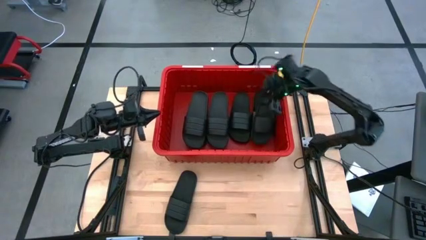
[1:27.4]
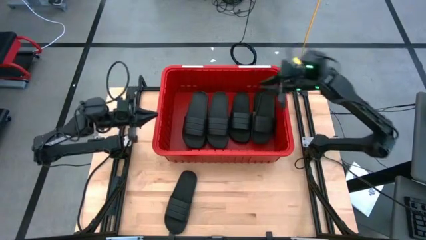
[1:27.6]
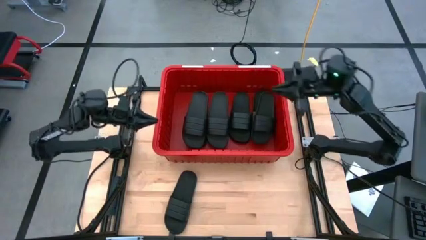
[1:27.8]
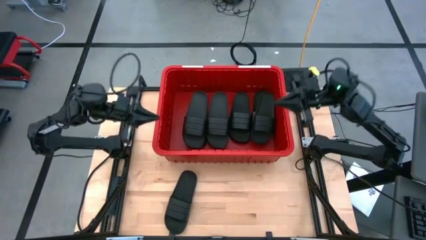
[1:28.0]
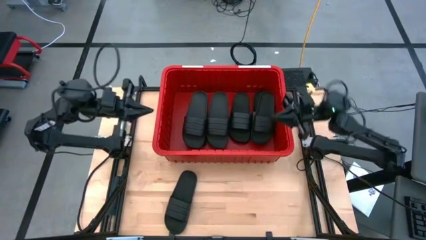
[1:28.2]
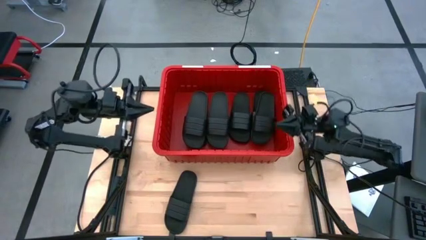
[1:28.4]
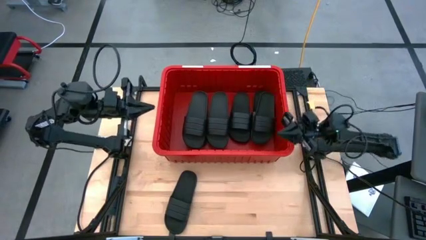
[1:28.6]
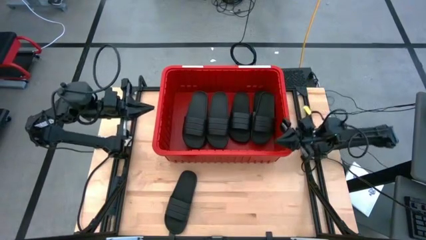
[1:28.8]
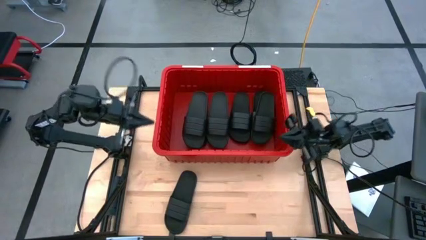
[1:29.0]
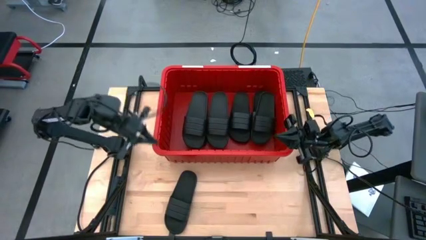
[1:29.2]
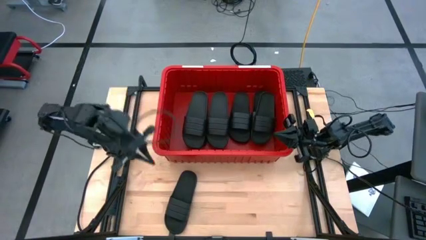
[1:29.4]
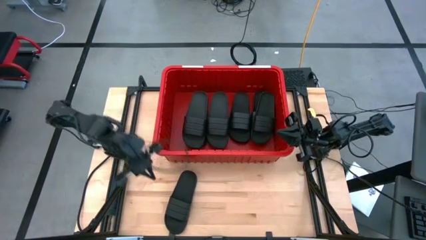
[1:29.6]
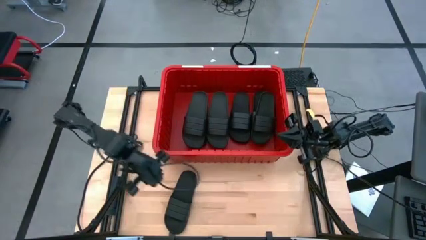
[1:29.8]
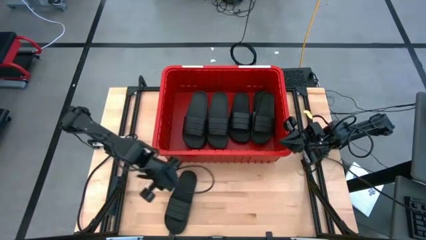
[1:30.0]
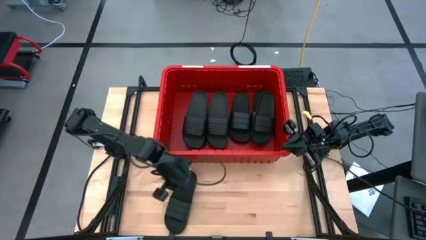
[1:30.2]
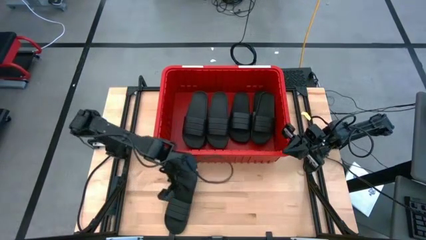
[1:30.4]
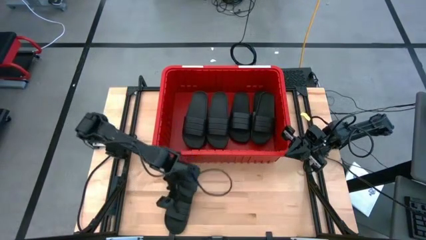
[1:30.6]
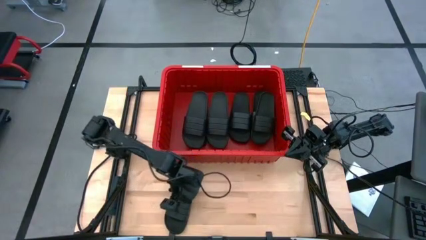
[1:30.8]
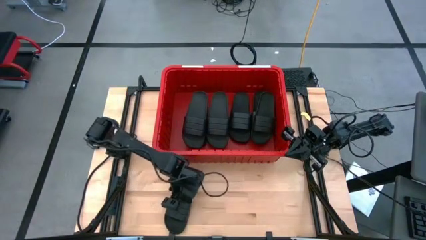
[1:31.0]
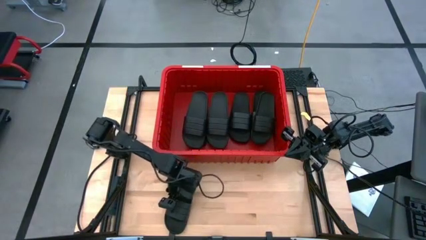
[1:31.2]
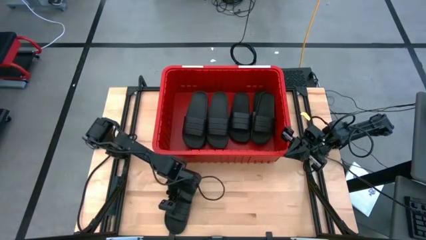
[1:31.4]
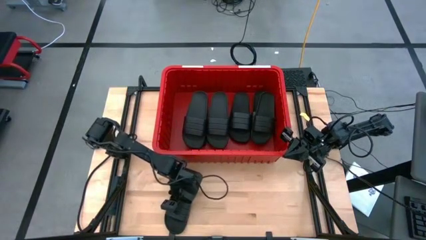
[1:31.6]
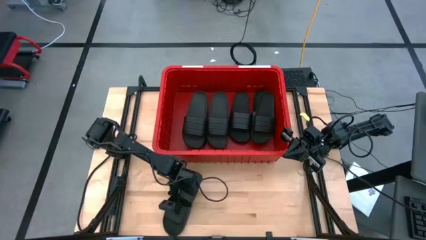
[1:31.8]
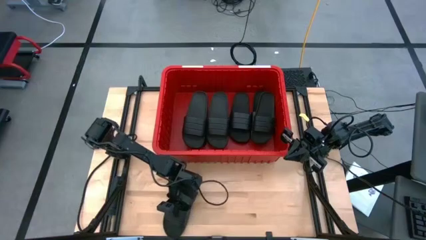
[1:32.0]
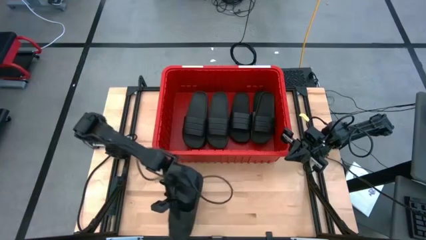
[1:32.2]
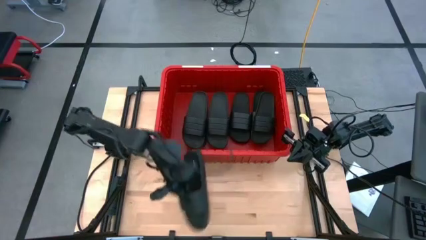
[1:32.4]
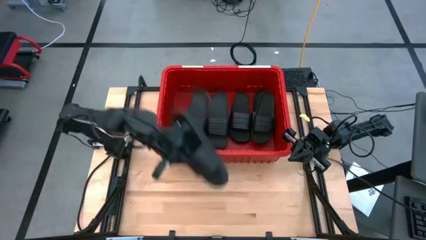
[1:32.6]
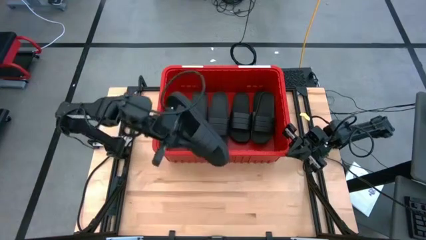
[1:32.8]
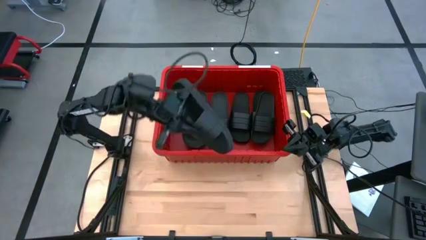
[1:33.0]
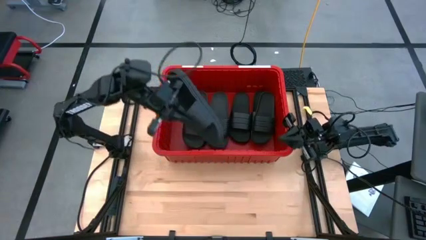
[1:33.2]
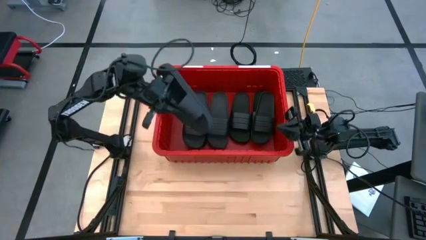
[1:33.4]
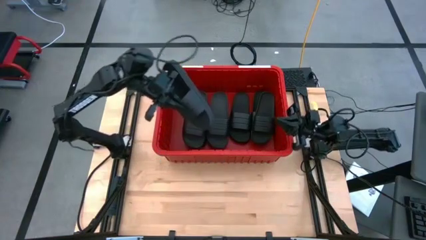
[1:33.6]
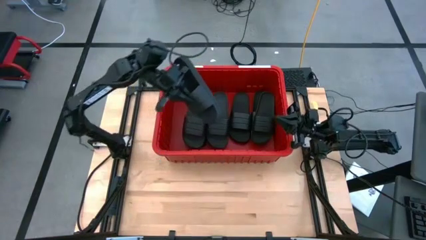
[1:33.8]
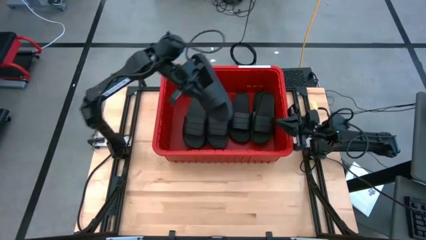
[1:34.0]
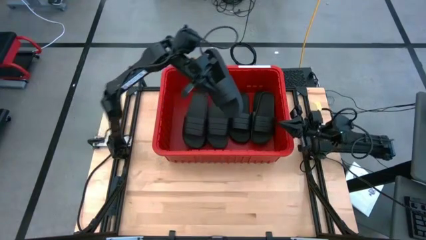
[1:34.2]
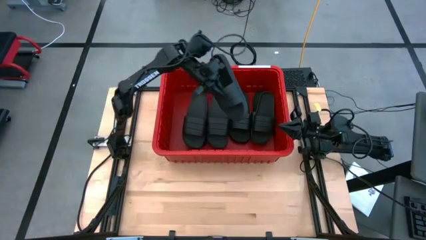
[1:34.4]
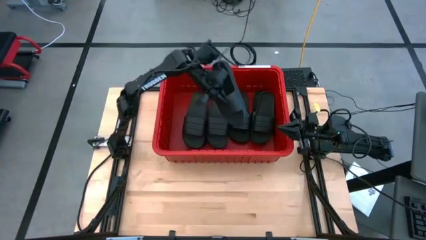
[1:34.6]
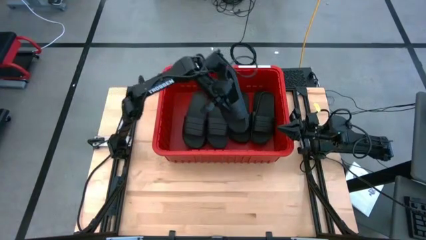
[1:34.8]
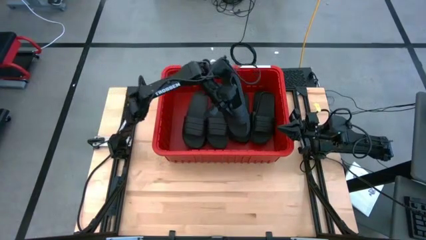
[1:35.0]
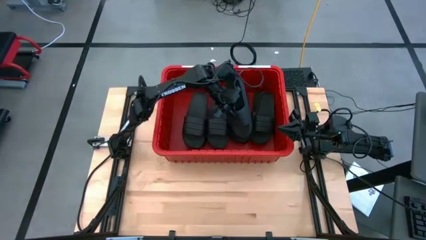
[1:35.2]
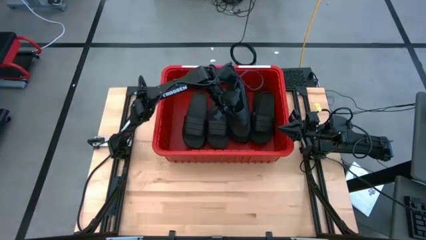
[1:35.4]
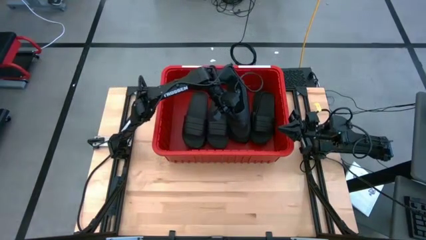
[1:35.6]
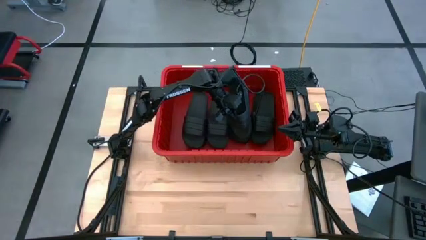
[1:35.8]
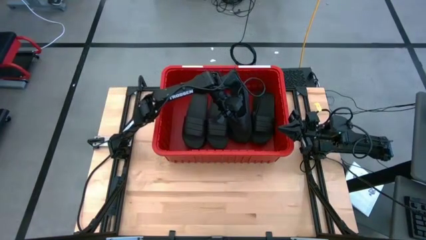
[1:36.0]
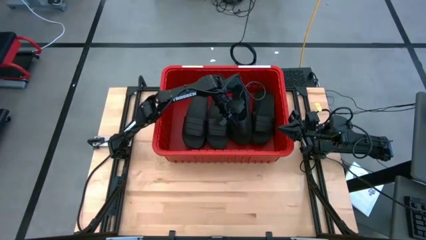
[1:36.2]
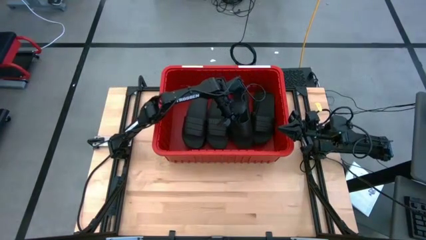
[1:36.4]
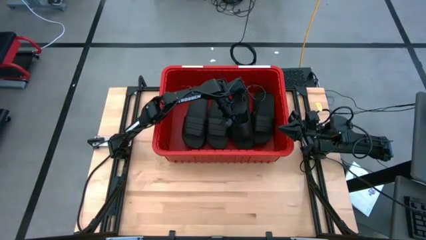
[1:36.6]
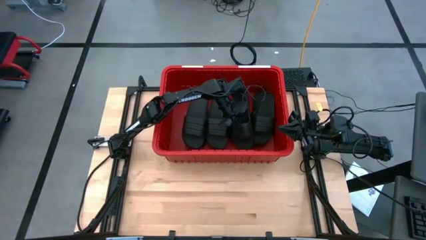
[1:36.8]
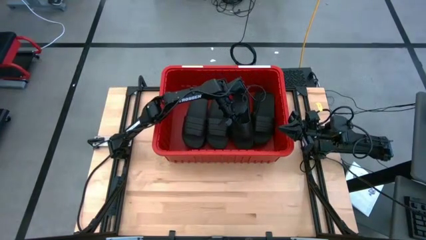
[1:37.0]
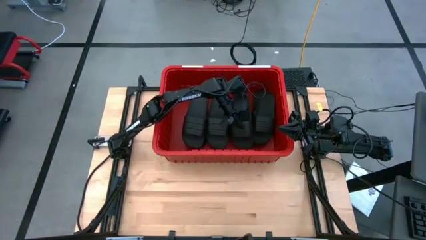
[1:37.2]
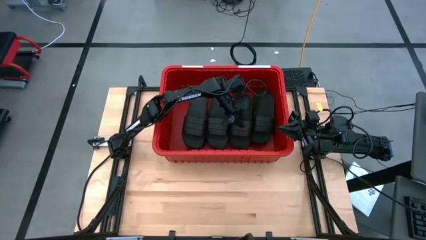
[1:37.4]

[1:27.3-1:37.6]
Task: Pick and place slides into bin
Put the black slipper into the bin
